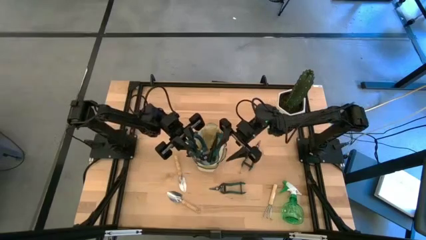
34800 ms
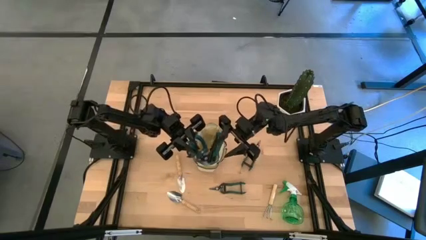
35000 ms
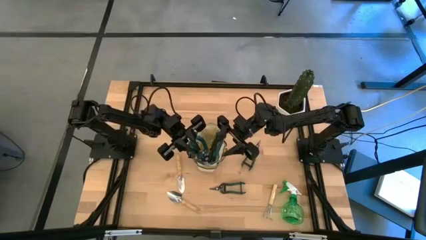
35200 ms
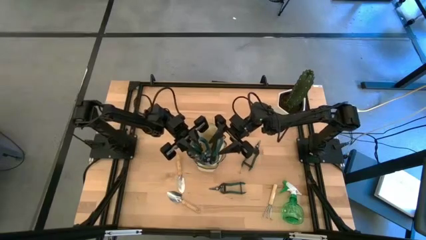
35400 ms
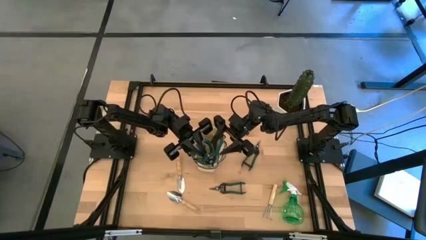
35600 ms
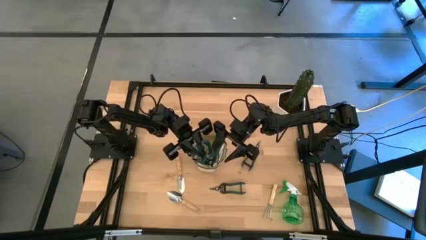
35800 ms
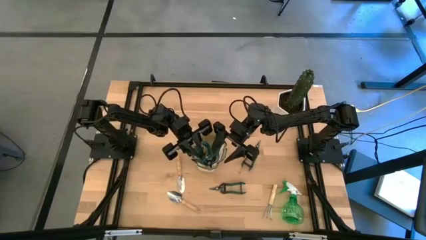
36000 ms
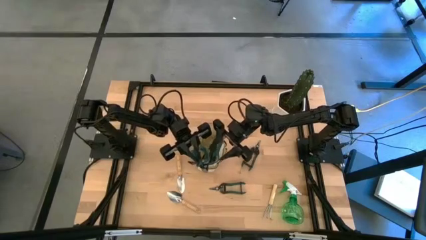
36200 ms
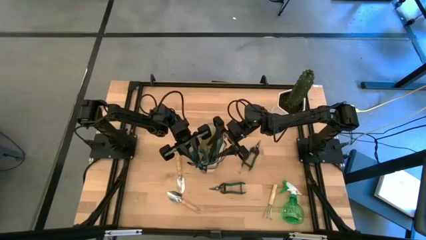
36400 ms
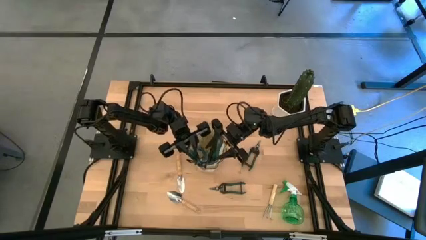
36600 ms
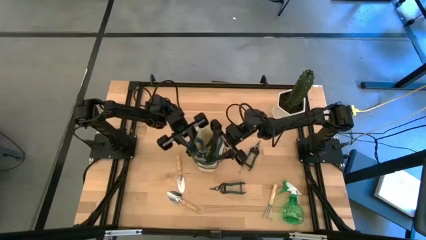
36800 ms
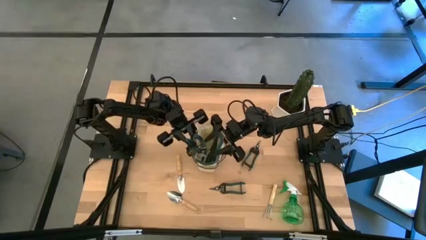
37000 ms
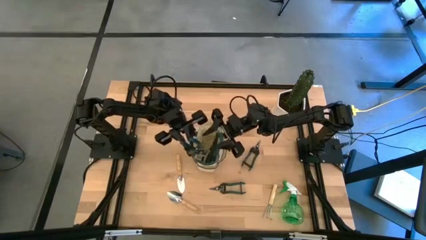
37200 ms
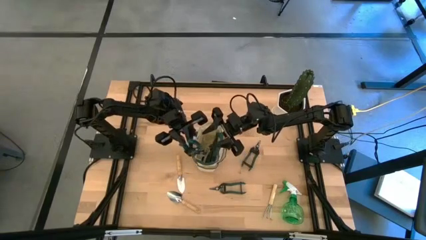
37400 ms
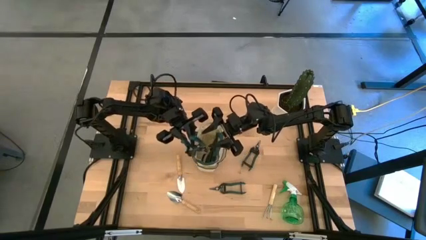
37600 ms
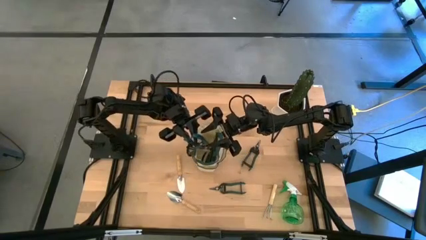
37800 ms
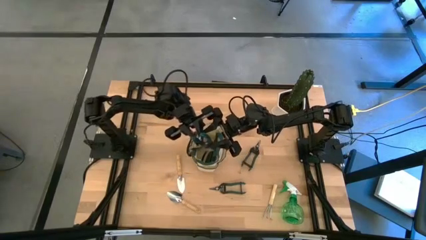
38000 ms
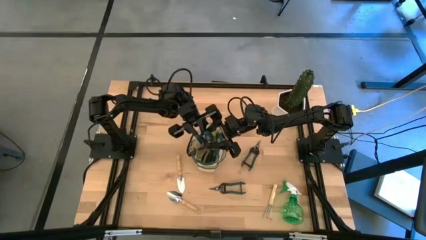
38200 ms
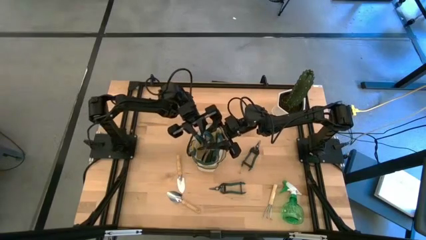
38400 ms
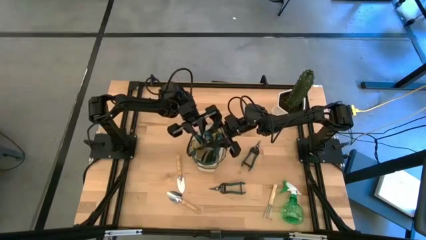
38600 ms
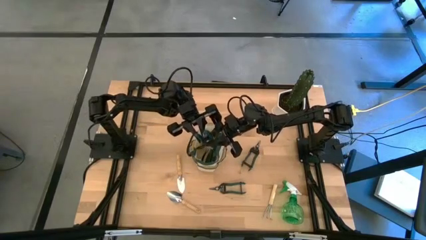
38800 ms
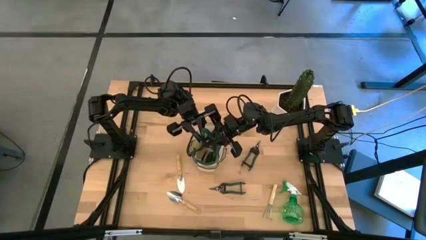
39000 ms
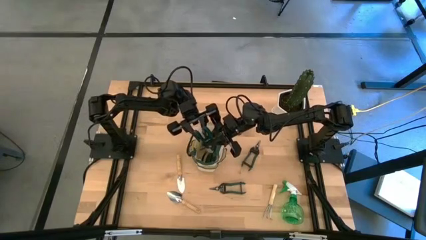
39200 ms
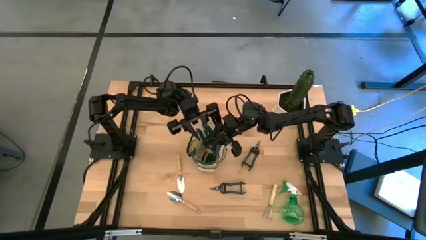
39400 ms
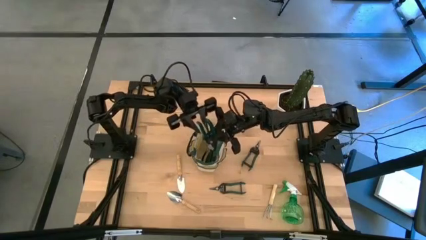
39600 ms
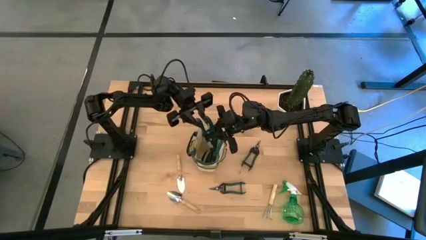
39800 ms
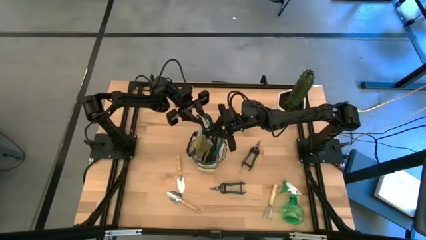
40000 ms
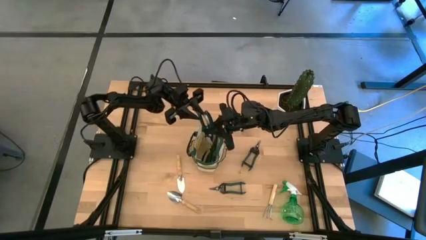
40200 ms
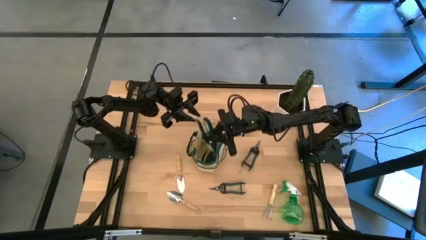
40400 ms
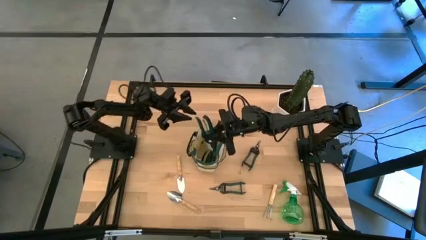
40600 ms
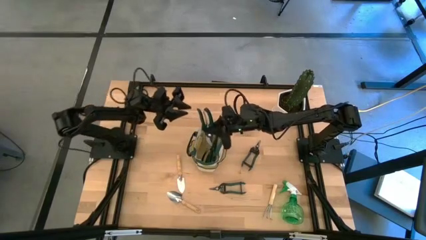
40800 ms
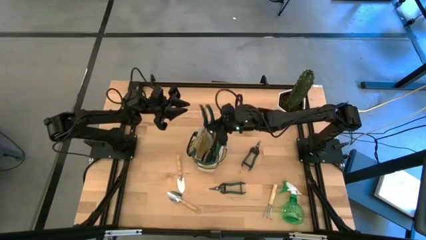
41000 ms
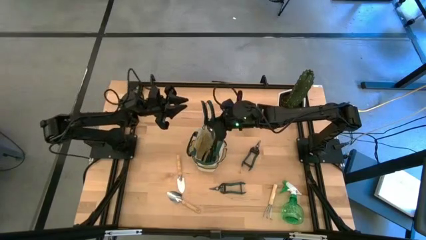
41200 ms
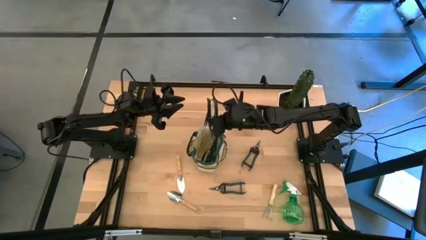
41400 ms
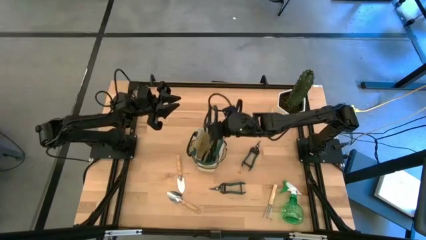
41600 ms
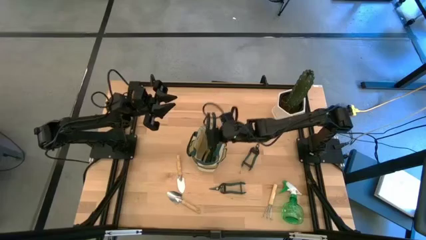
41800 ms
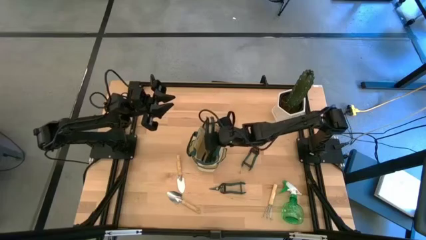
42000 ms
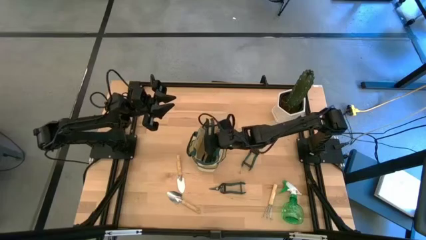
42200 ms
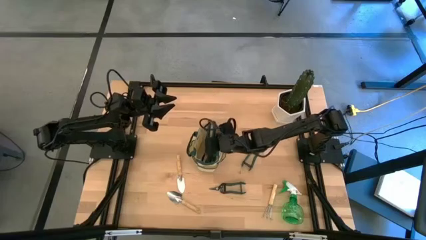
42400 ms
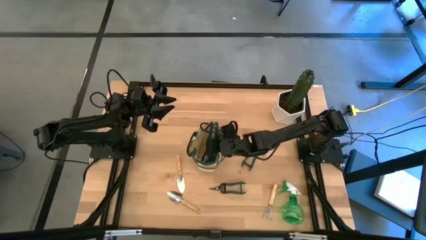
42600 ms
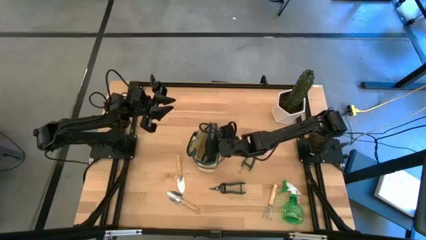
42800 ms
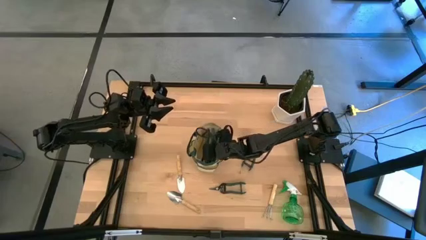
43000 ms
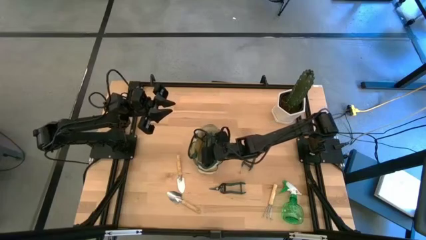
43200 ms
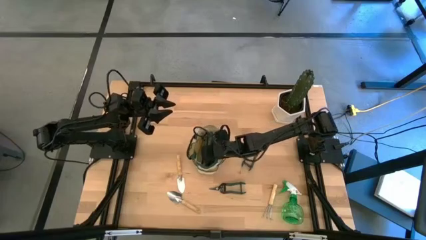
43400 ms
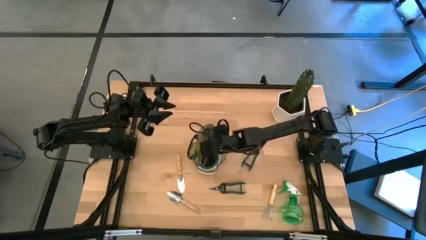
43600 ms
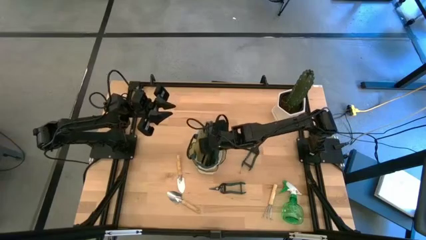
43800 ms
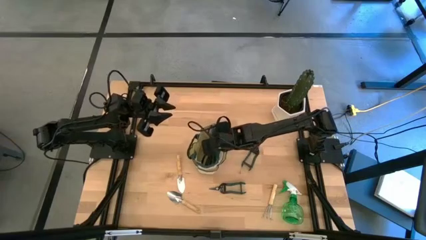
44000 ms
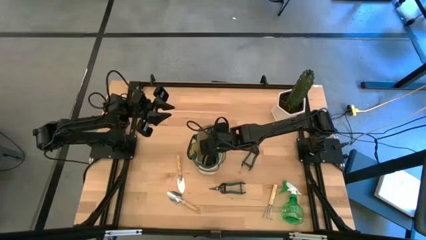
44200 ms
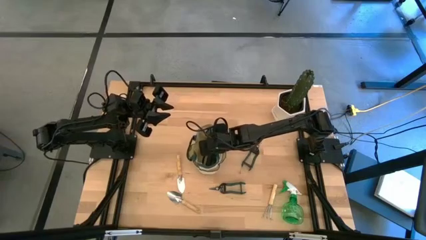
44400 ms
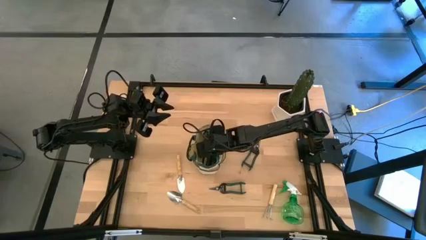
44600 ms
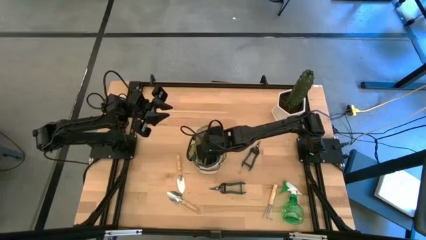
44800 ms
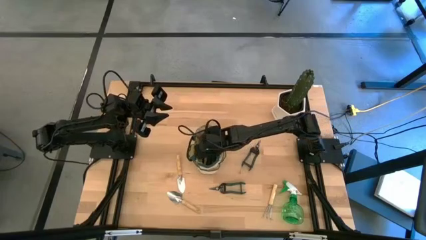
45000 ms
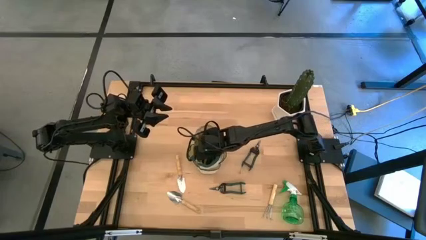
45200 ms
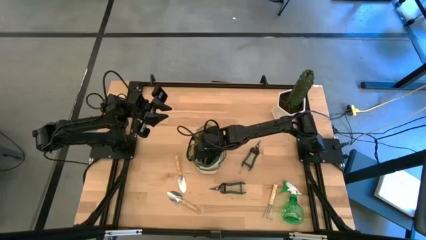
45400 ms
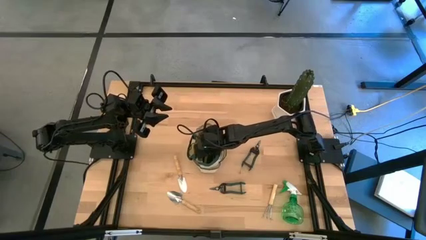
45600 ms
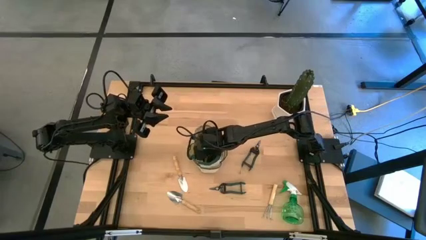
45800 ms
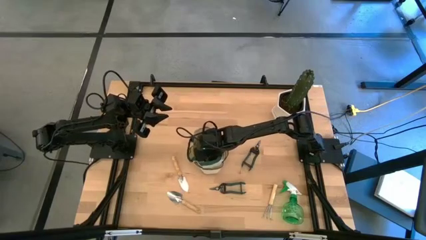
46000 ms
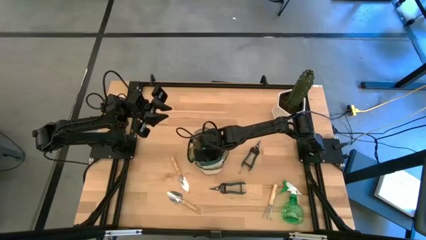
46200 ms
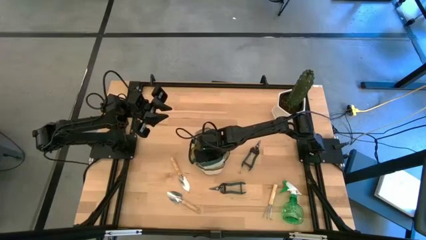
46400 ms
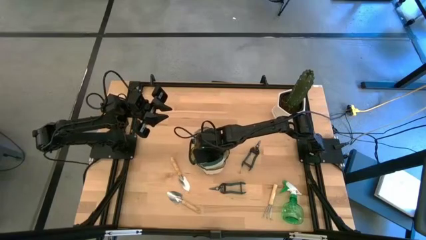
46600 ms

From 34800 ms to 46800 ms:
Task: Pick & Place Garden tools in Gardening bag
Put the green shear scissors into the green gardening bag
